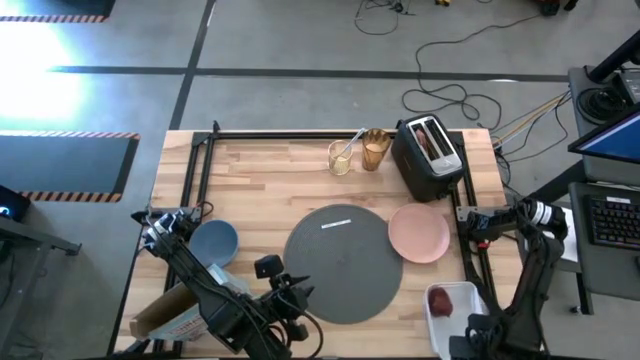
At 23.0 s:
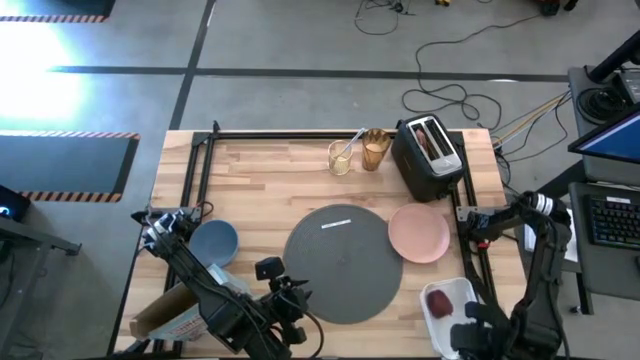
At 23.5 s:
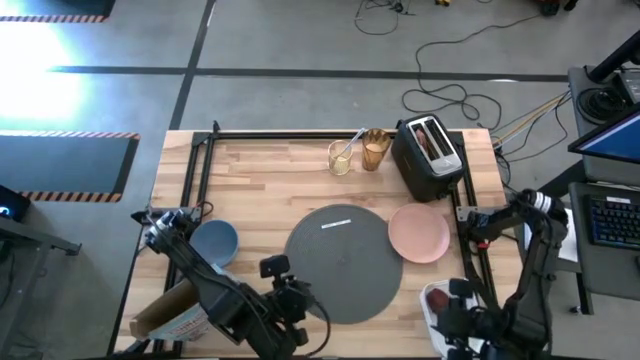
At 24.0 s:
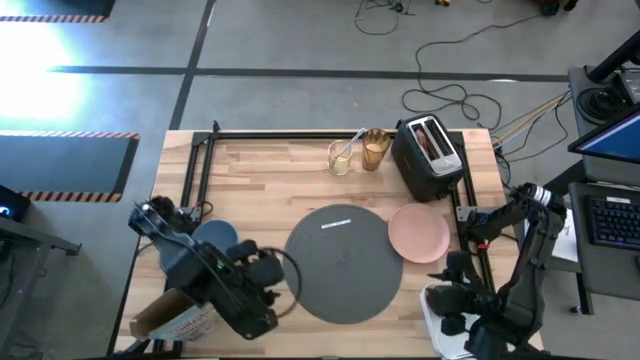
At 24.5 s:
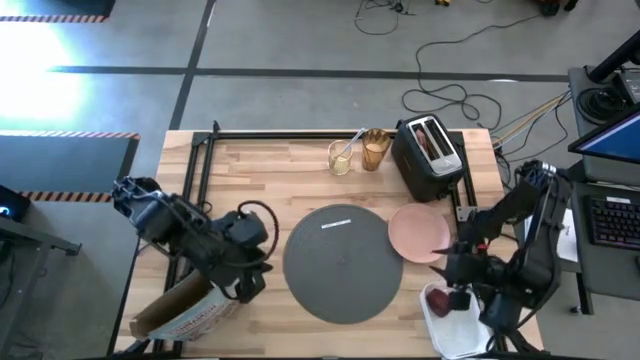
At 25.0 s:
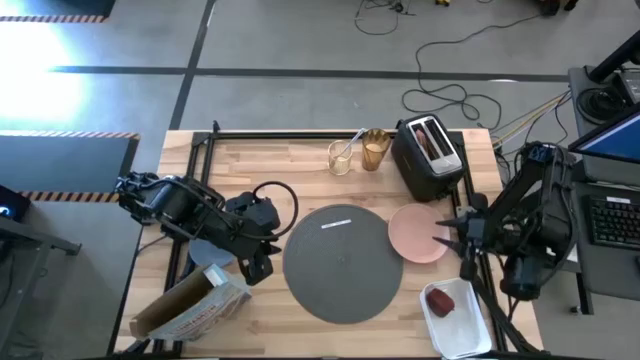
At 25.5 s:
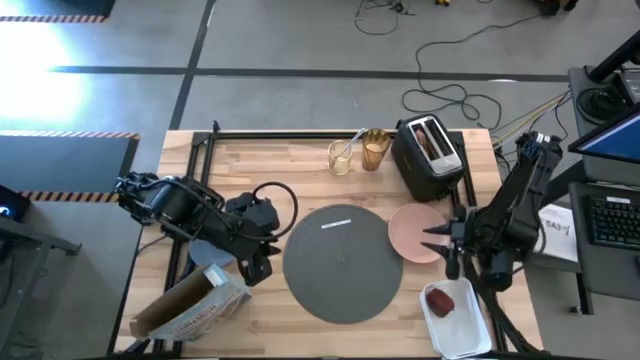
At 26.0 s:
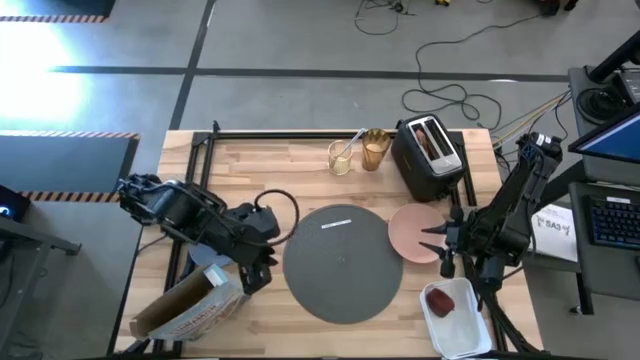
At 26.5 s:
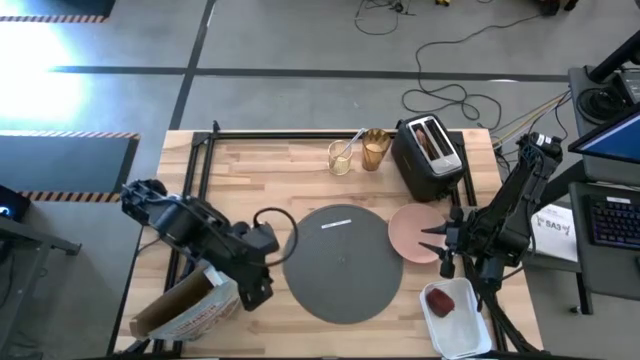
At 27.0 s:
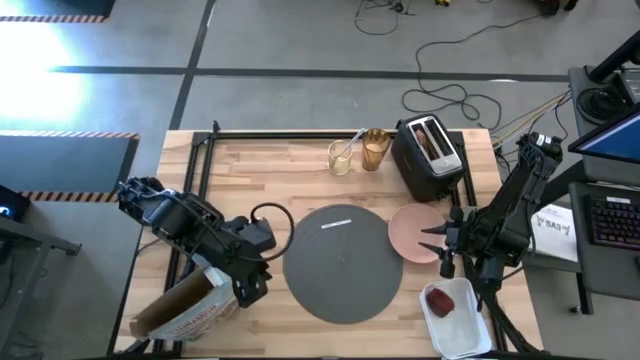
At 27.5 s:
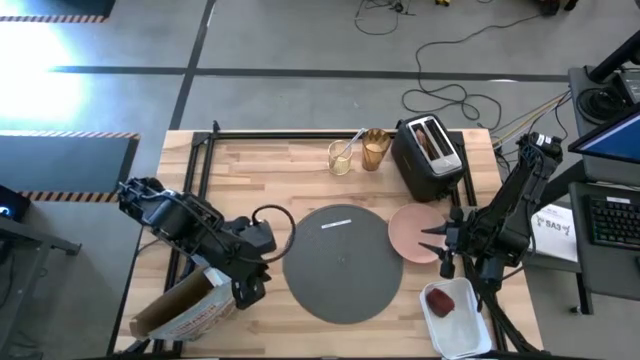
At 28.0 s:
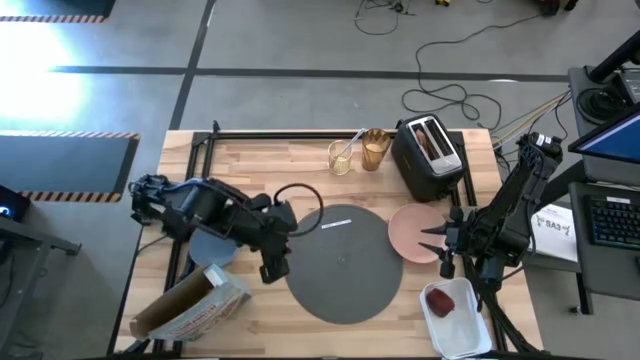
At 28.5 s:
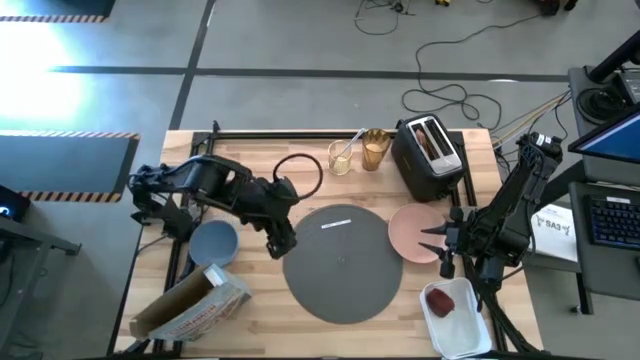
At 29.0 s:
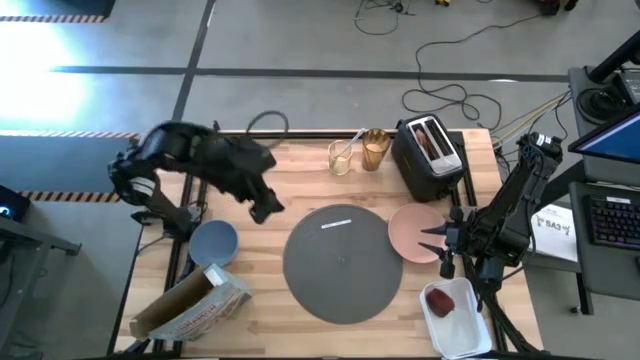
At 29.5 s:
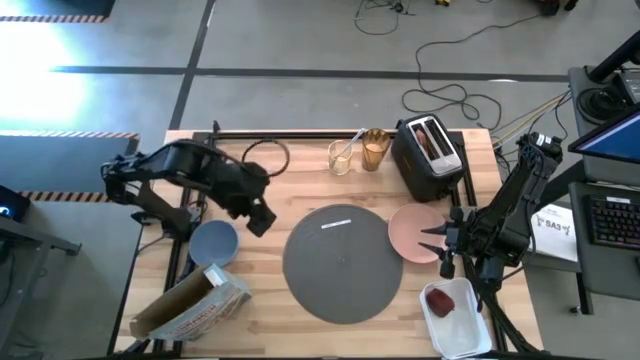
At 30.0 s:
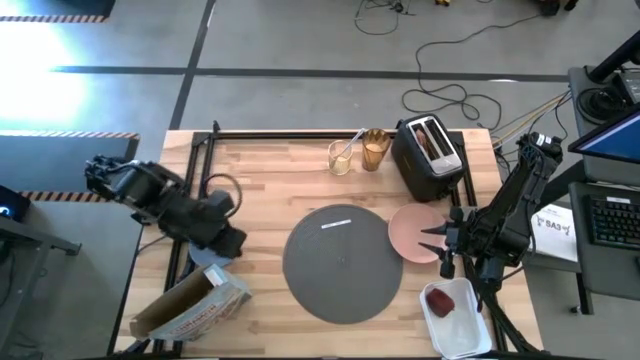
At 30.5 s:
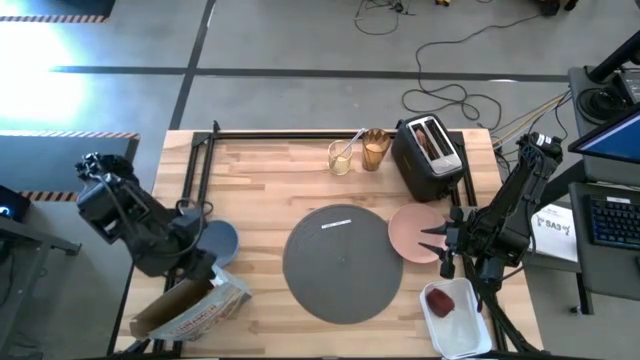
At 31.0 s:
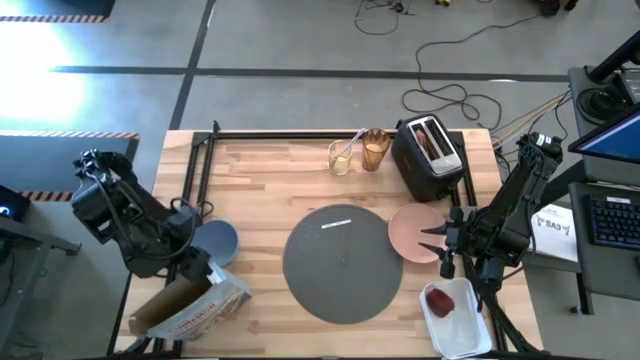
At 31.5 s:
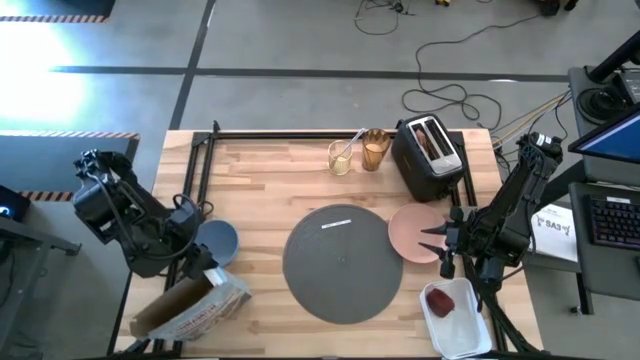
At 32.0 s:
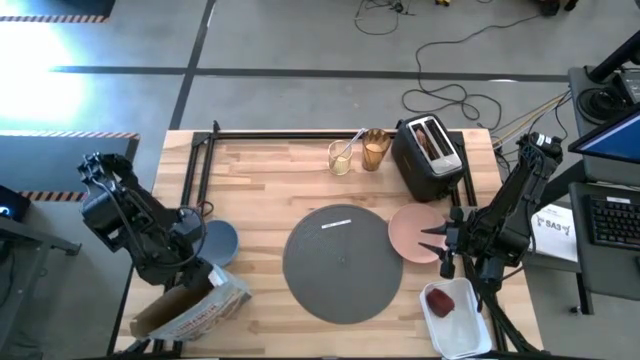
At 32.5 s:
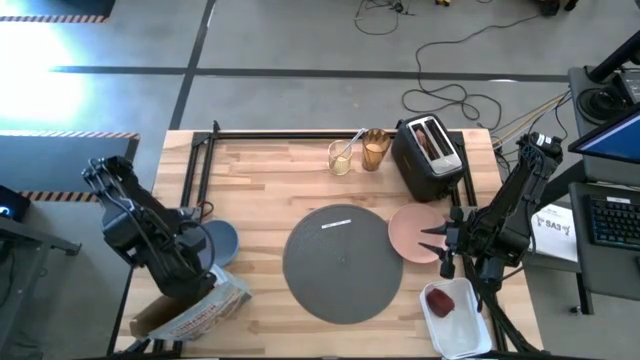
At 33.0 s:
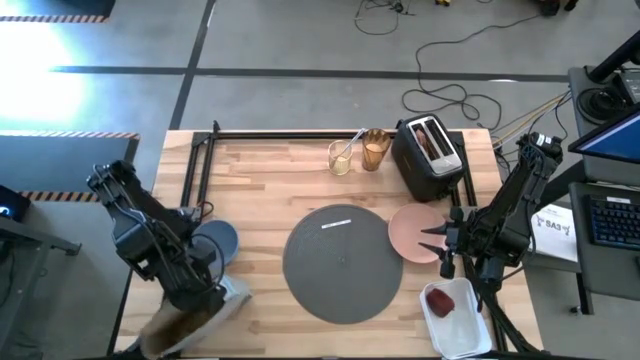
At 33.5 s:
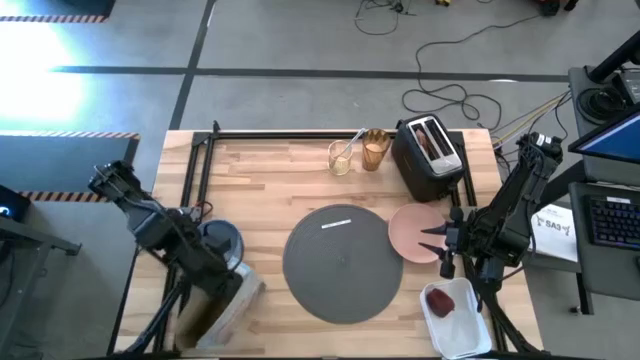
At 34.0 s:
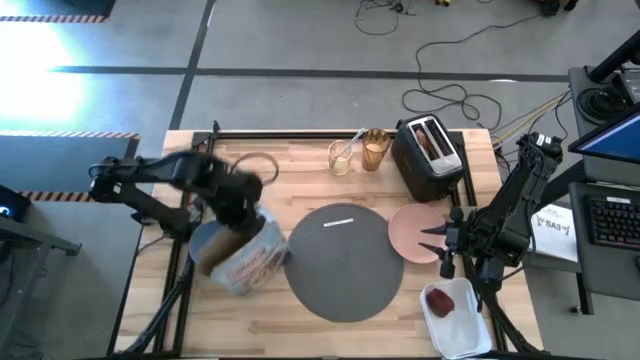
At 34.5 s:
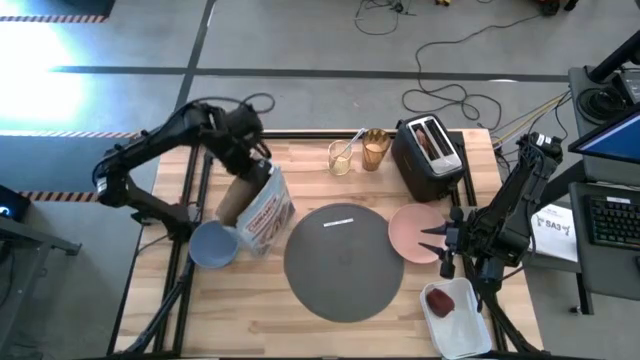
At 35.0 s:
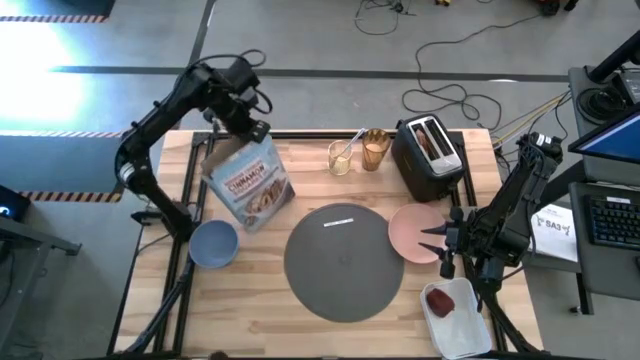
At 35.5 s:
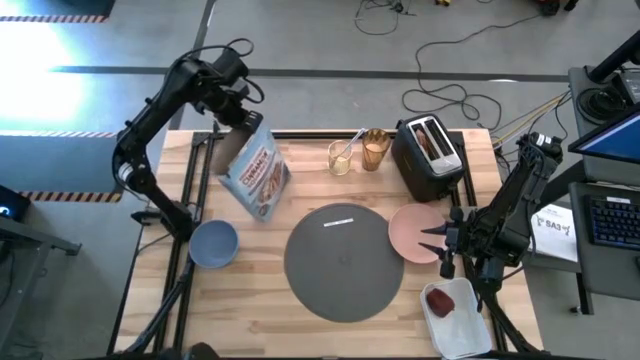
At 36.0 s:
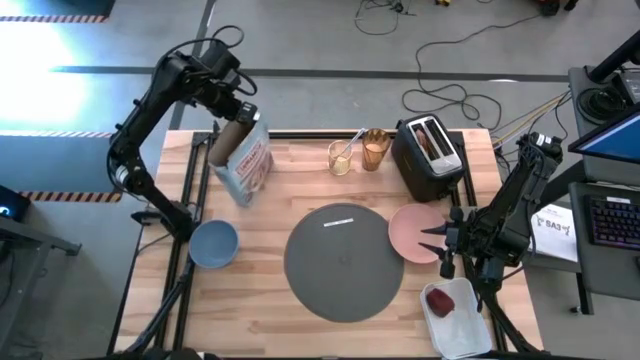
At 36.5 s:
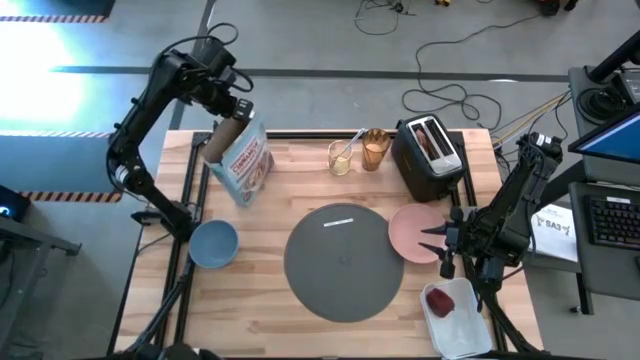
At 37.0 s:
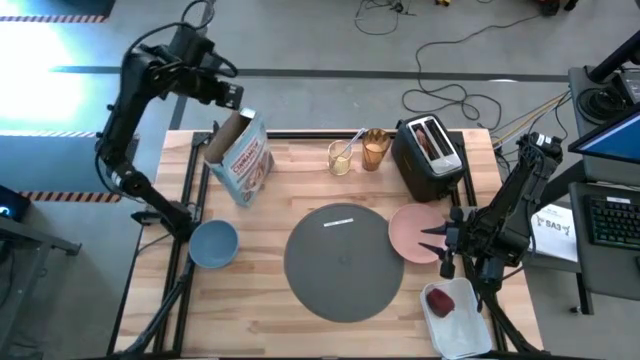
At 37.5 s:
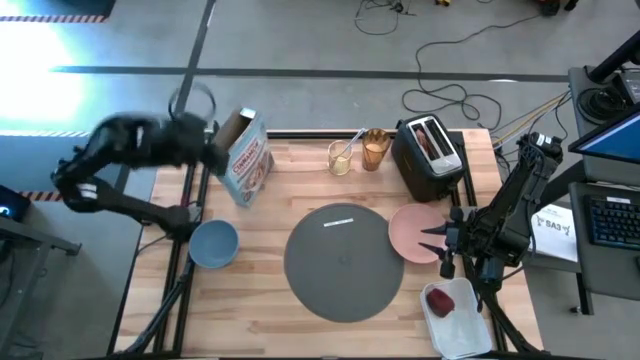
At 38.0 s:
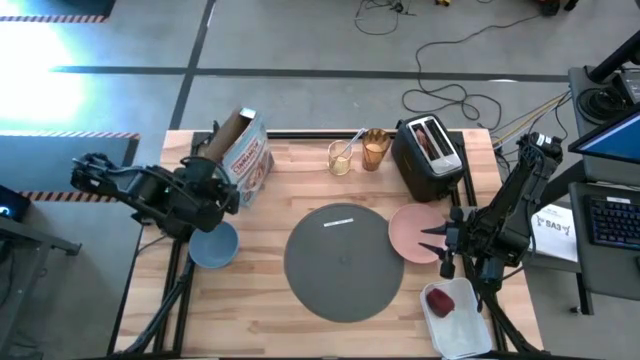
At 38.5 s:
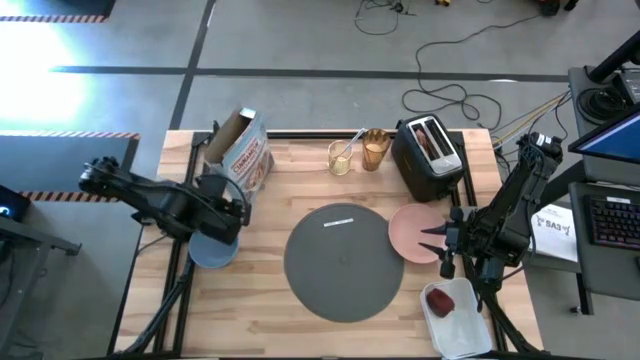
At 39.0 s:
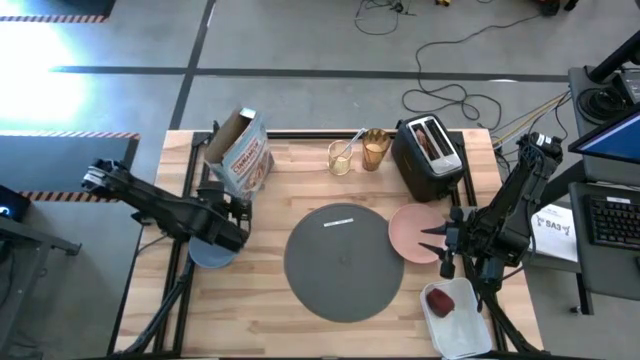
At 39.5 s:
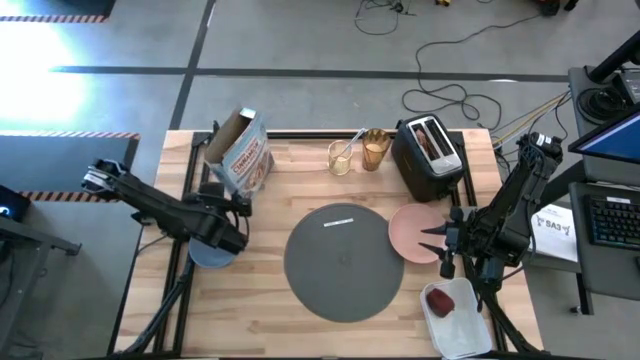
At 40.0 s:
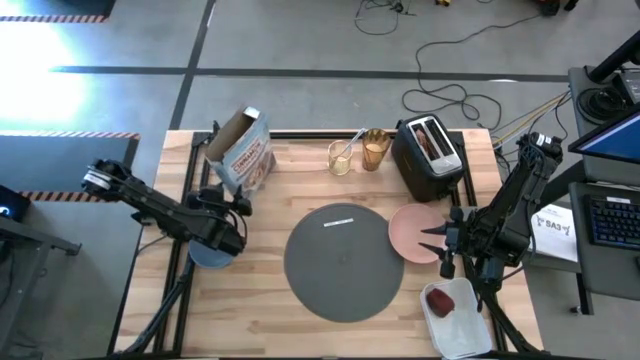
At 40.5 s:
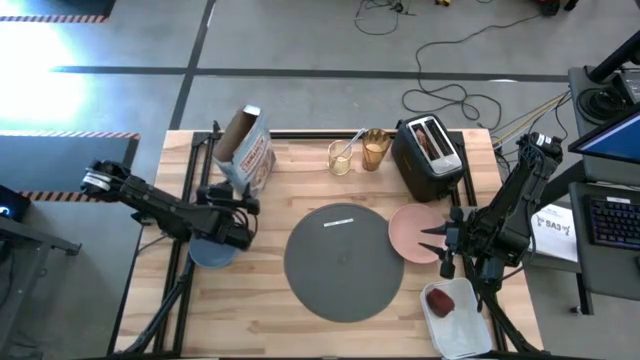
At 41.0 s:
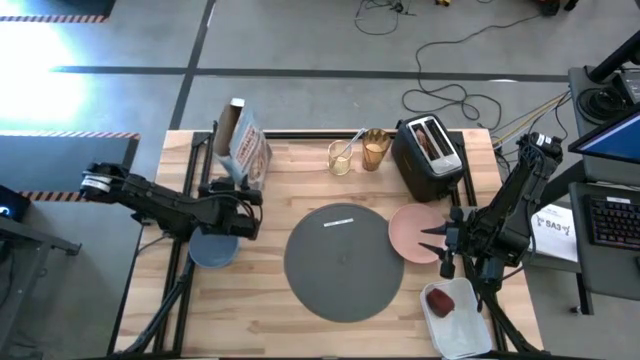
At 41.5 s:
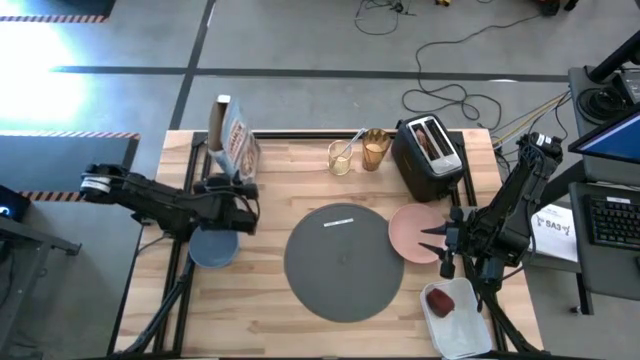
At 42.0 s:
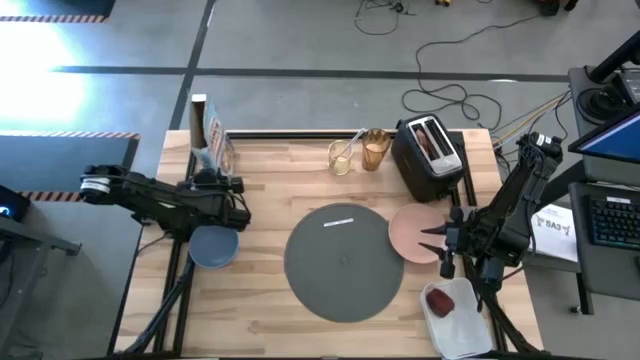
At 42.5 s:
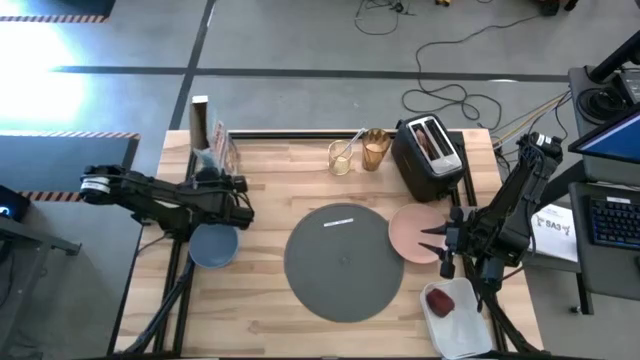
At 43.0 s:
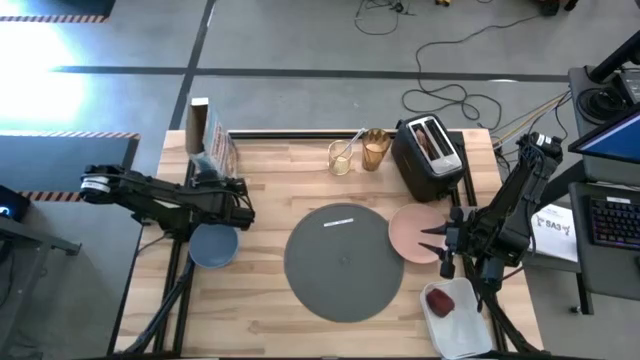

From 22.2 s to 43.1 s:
Task: Arrange a breakfast setting
Move the cereal box from the bottom to the top left of the table
